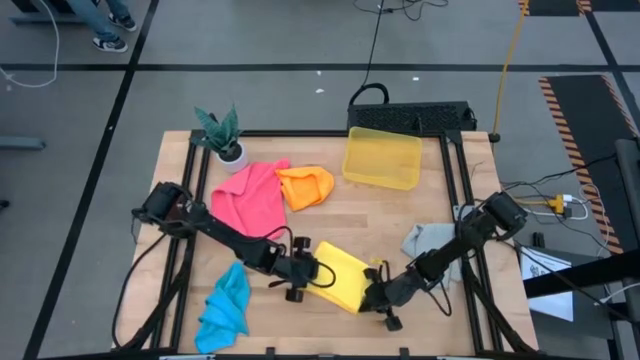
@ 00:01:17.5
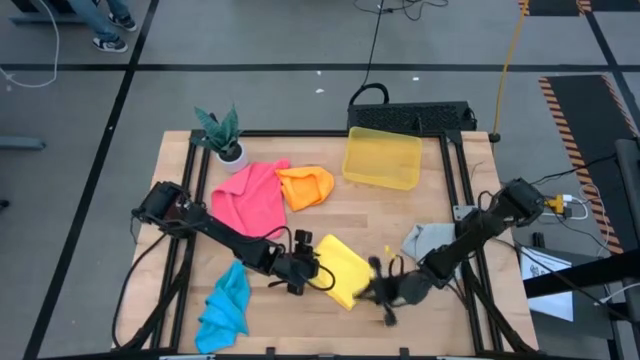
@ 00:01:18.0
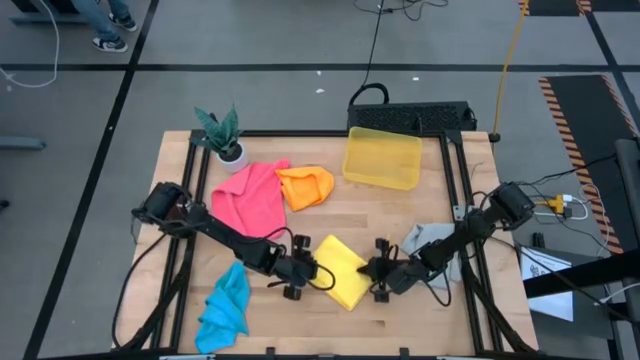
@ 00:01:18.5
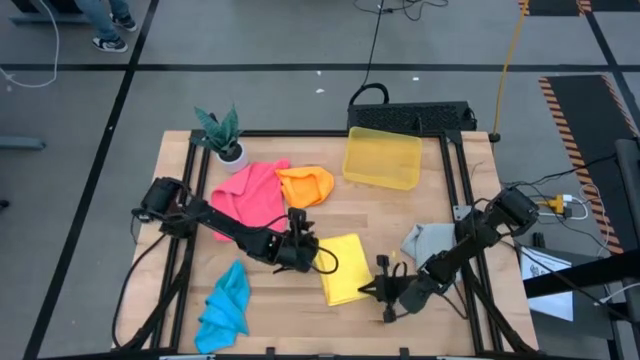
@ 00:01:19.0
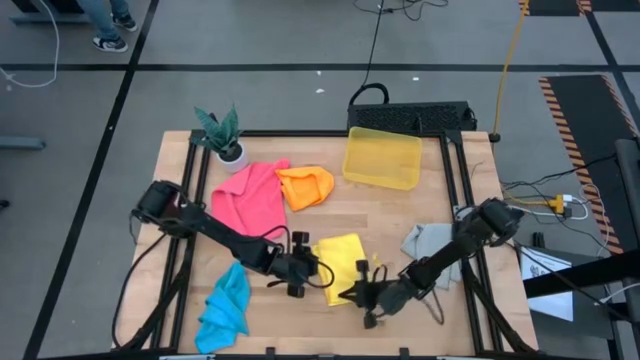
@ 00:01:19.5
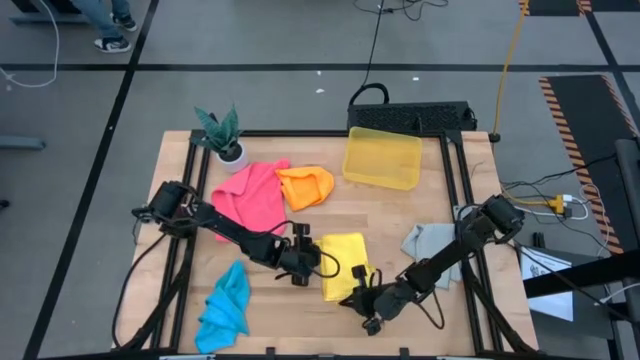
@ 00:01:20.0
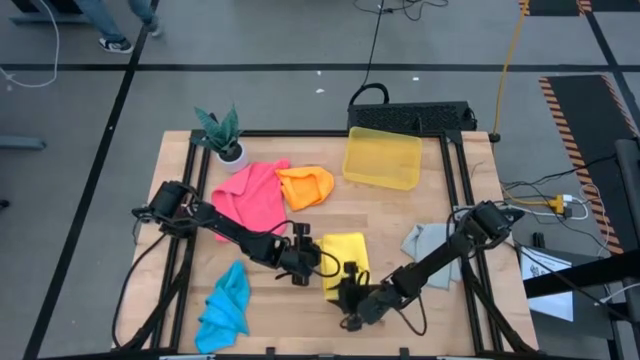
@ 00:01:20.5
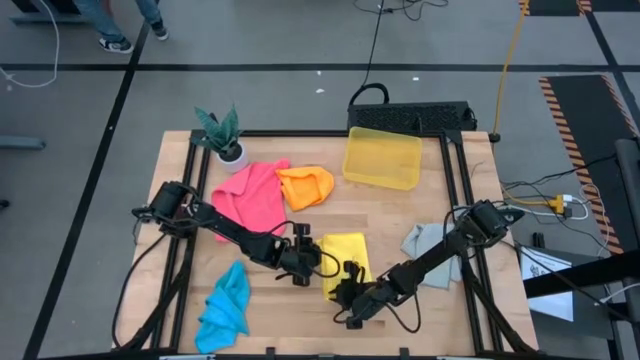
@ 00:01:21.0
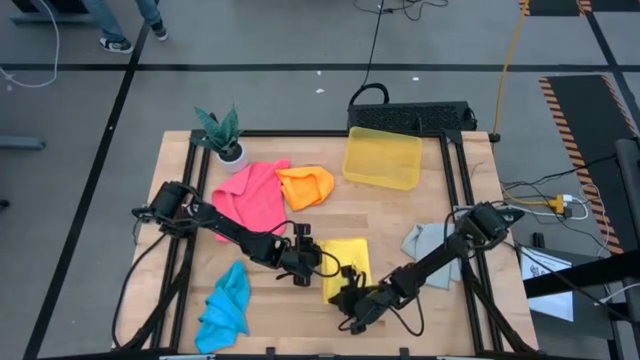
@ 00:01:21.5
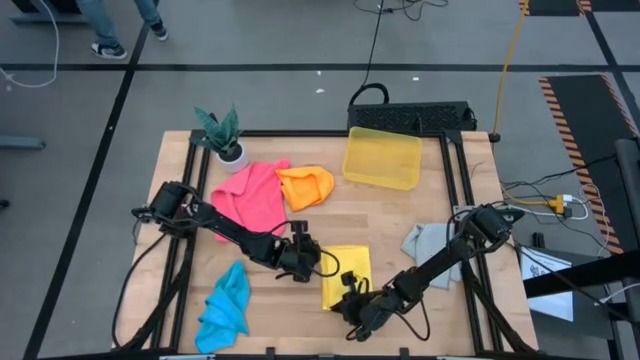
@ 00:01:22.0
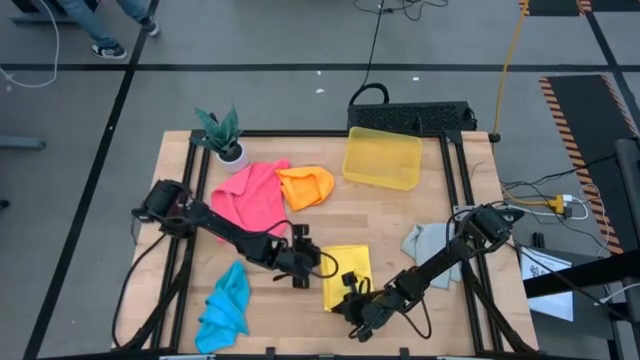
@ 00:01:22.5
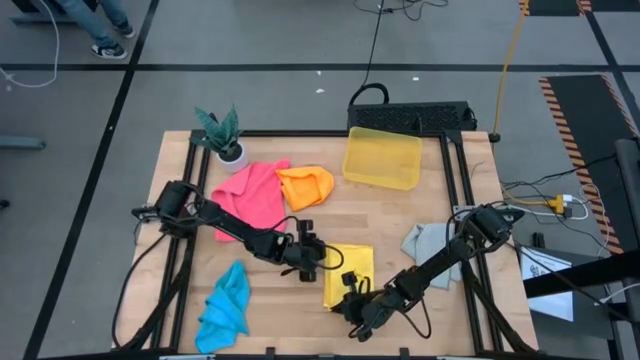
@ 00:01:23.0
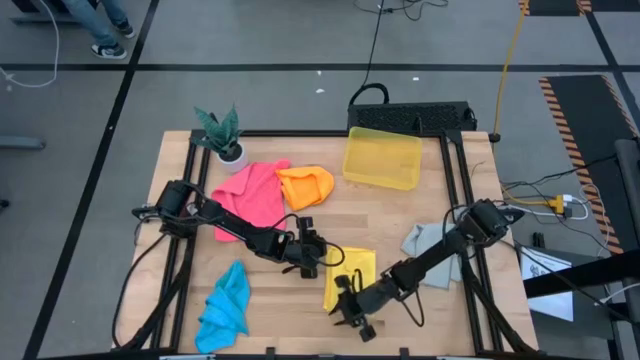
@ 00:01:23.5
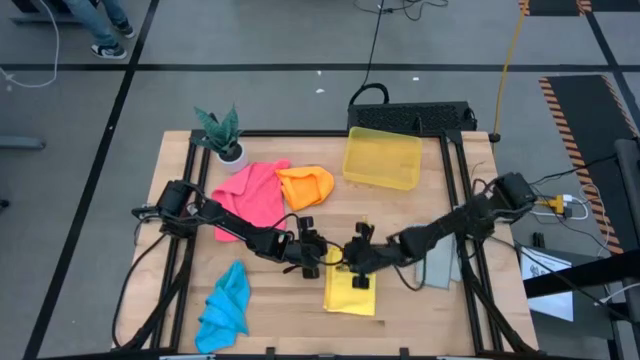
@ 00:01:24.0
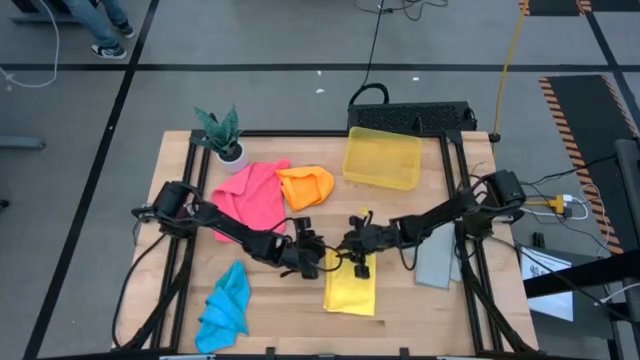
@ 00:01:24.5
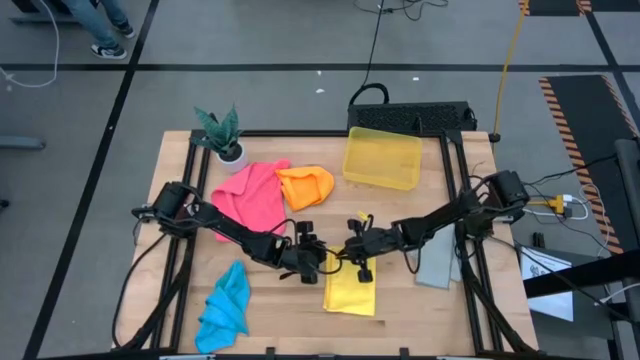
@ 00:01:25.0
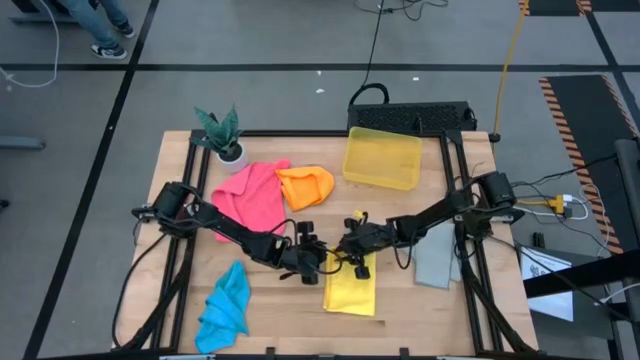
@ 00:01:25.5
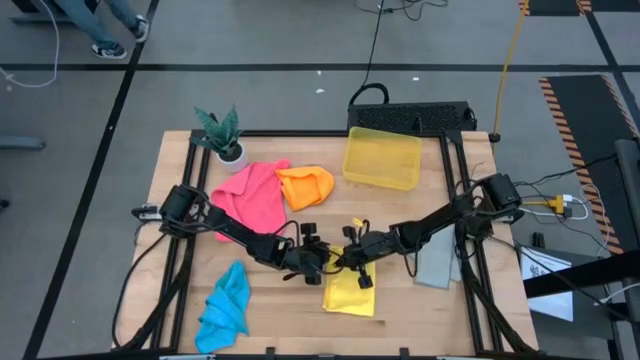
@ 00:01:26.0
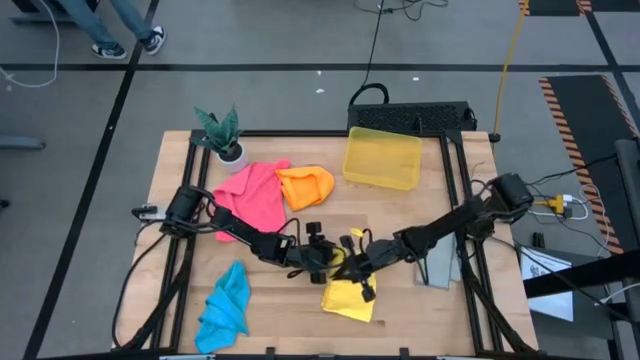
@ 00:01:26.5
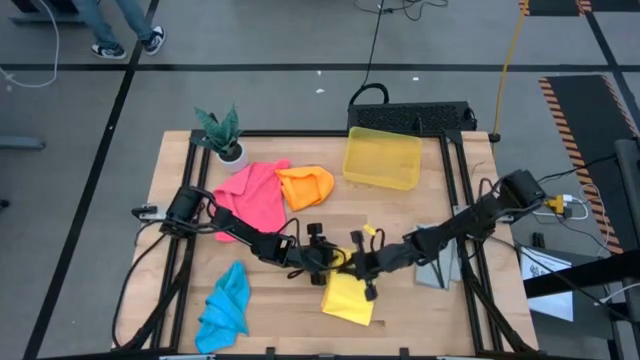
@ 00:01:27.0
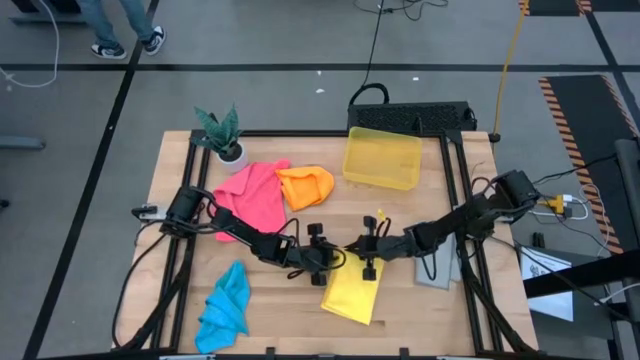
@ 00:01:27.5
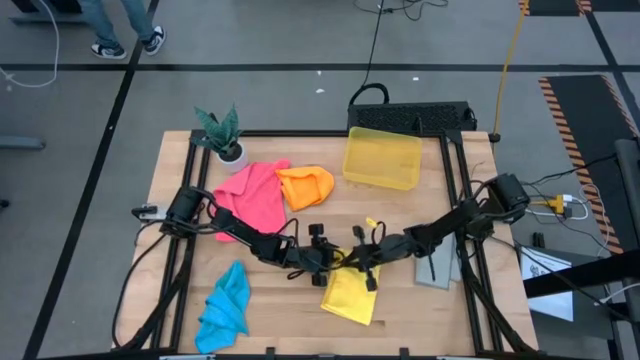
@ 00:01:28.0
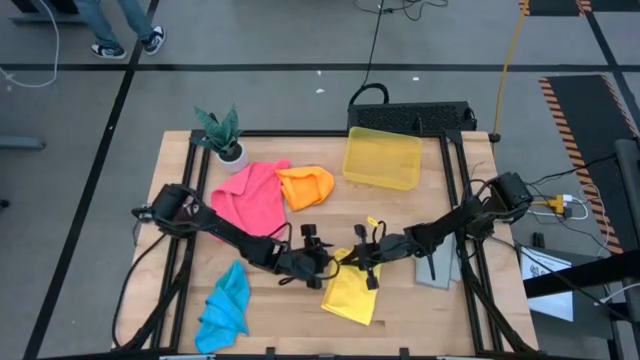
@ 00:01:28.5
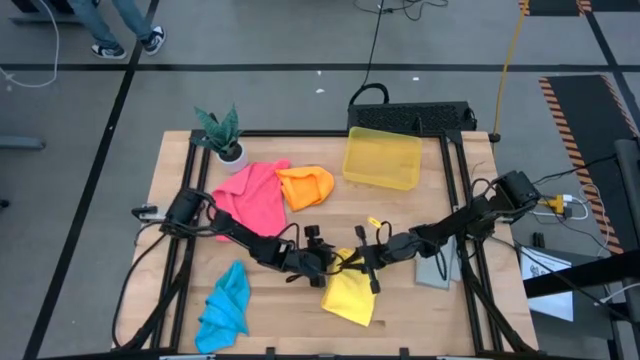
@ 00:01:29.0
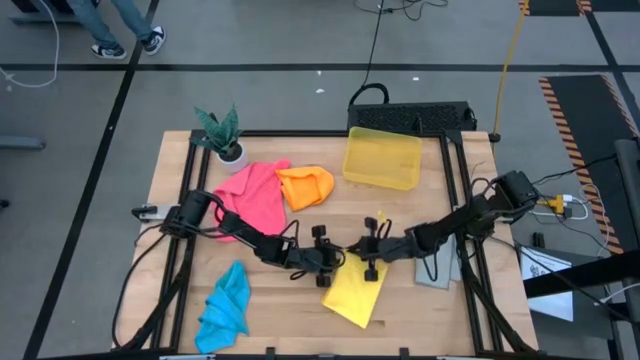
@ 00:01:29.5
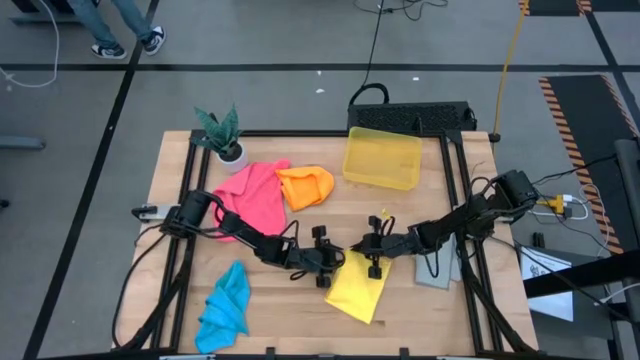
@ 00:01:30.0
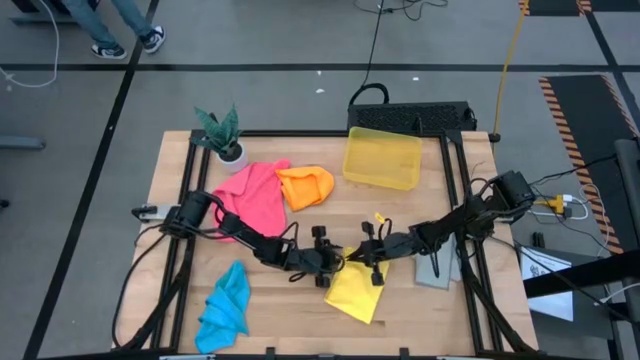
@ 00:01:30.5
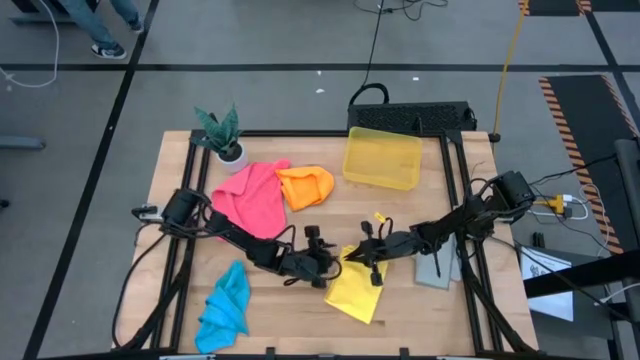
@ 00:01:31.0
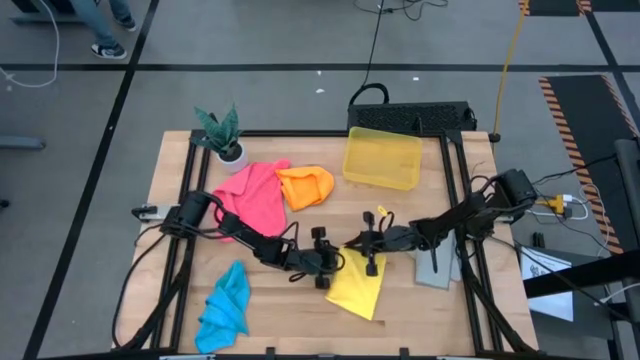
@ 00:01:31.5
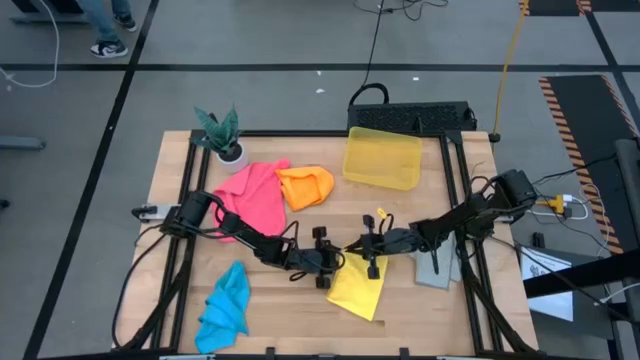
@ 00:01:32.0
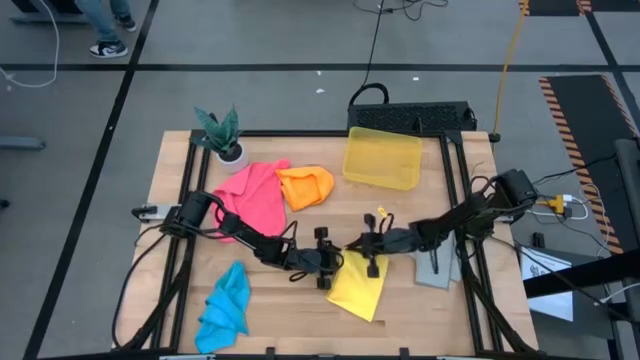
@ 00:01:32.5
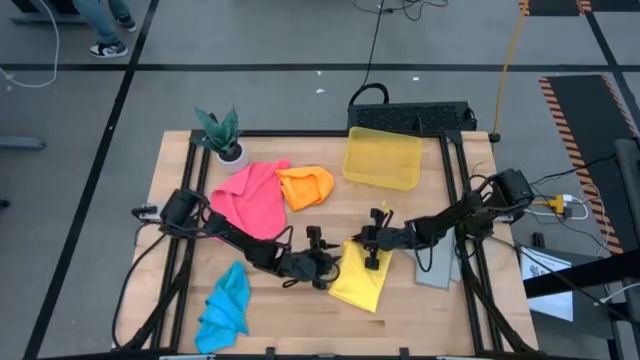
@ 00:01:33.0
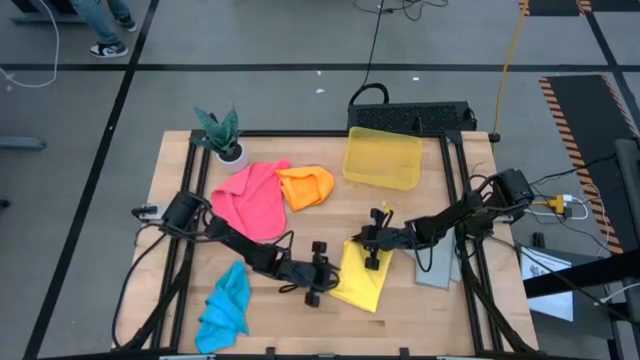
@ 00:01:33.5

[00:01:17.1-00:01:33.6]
Task: Fold microfiber towels
Fold the yellow kitchen towel
